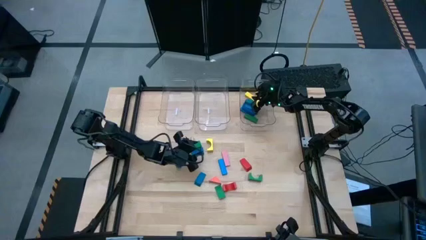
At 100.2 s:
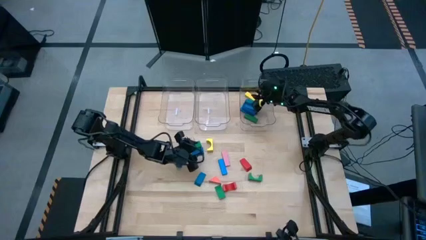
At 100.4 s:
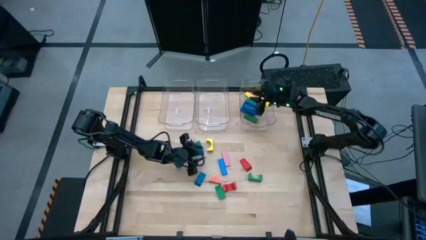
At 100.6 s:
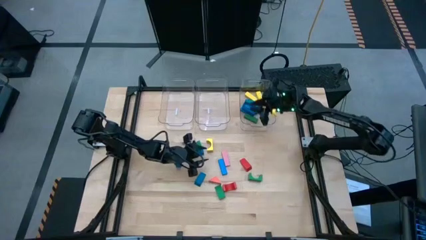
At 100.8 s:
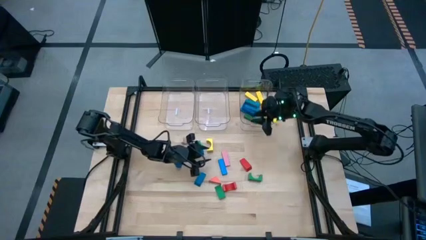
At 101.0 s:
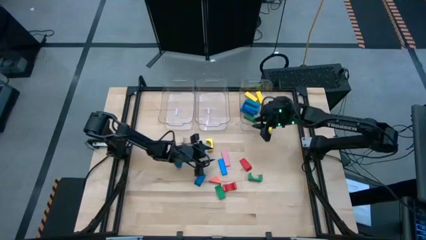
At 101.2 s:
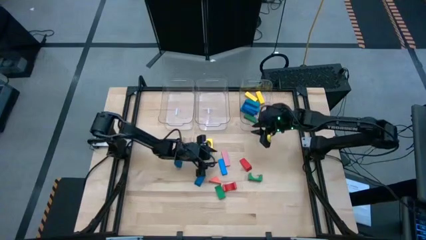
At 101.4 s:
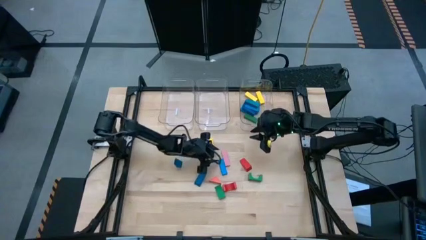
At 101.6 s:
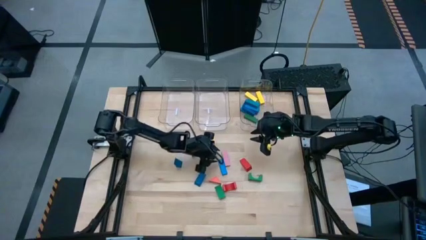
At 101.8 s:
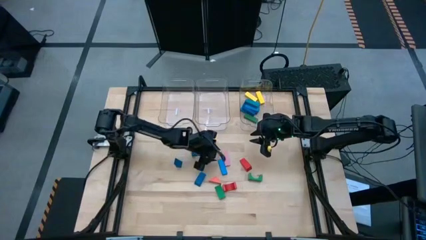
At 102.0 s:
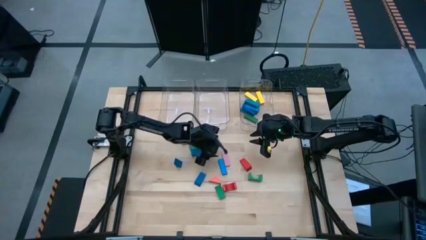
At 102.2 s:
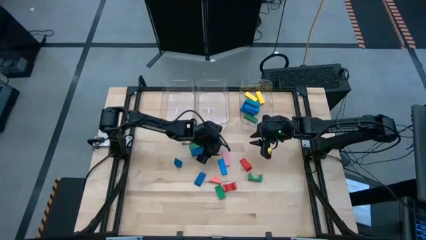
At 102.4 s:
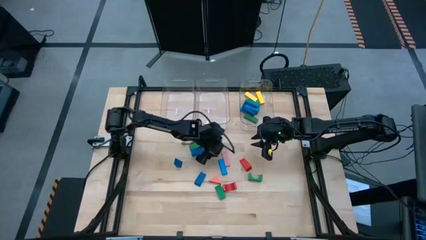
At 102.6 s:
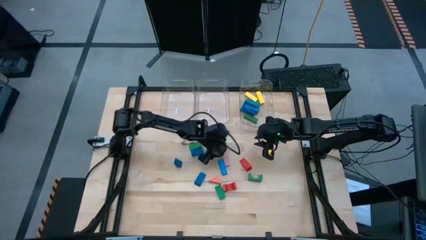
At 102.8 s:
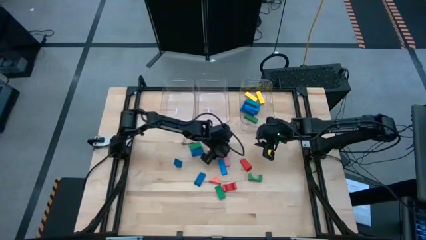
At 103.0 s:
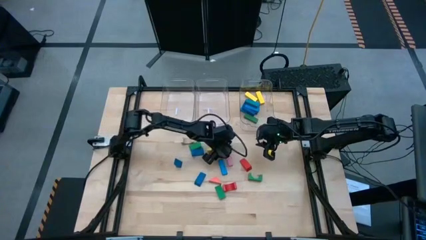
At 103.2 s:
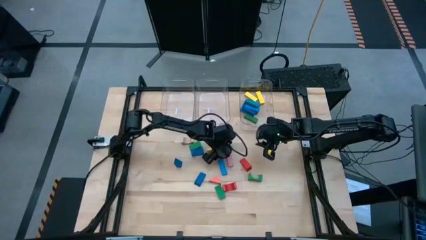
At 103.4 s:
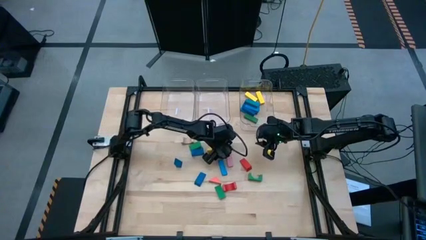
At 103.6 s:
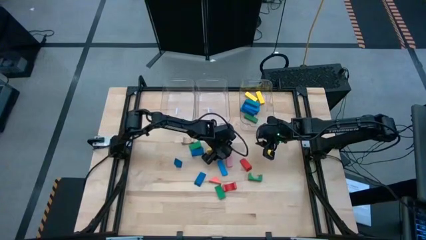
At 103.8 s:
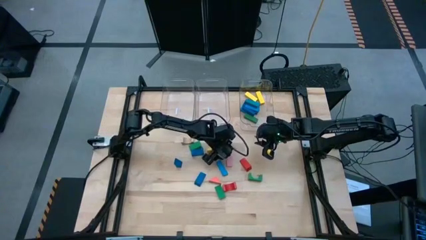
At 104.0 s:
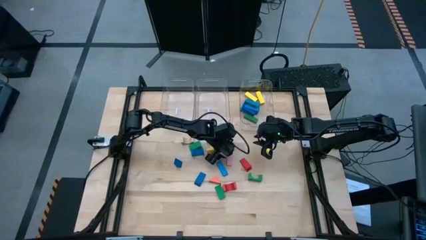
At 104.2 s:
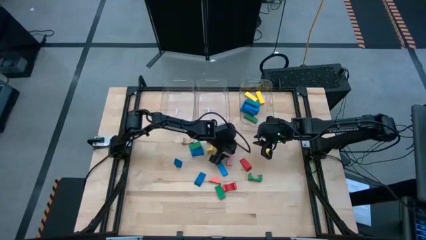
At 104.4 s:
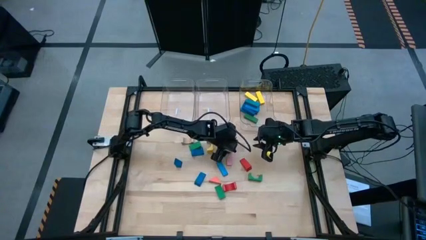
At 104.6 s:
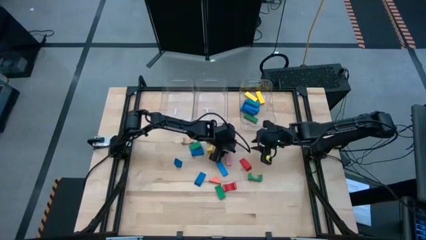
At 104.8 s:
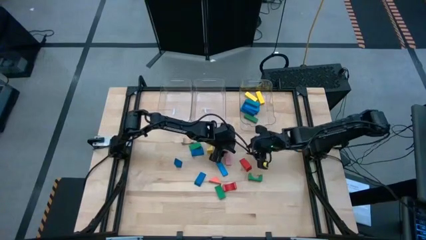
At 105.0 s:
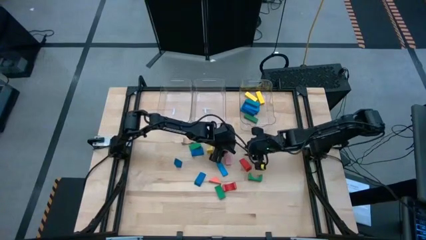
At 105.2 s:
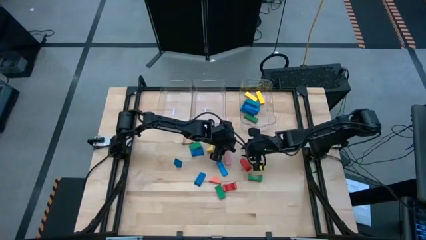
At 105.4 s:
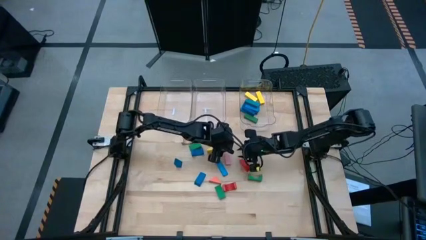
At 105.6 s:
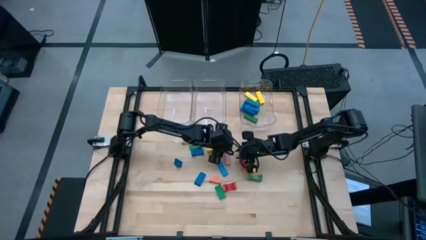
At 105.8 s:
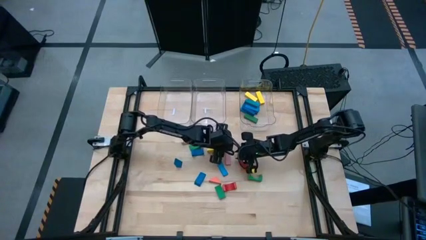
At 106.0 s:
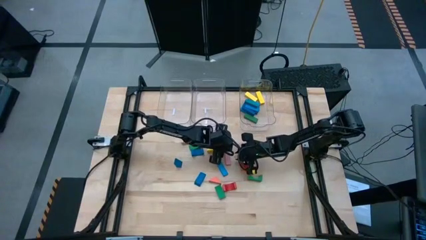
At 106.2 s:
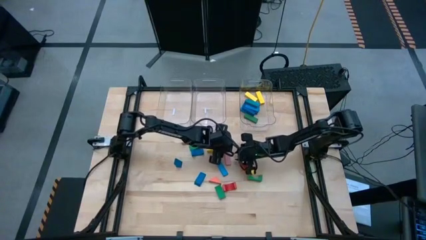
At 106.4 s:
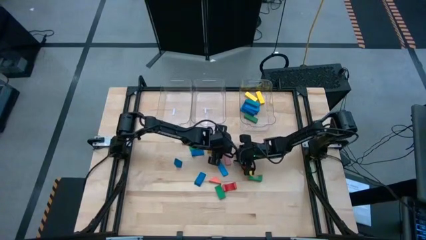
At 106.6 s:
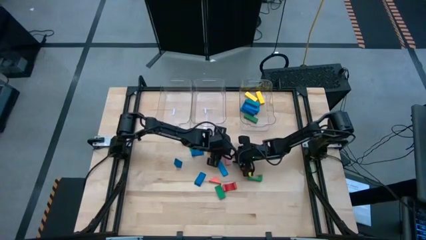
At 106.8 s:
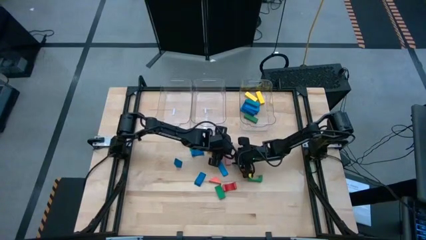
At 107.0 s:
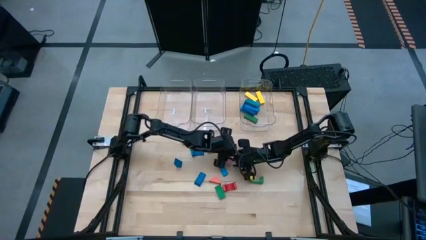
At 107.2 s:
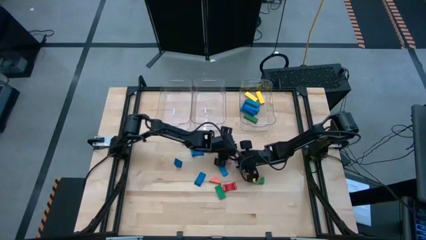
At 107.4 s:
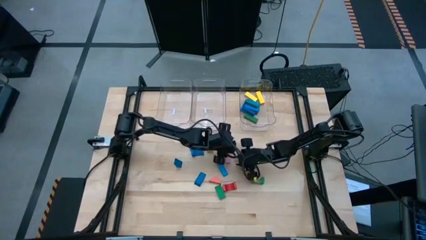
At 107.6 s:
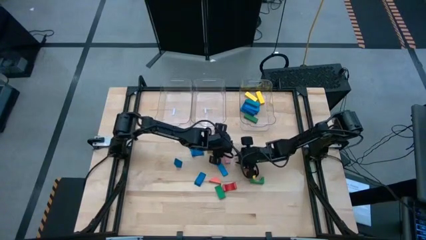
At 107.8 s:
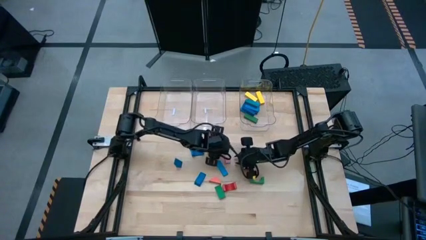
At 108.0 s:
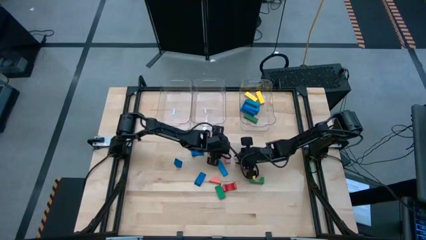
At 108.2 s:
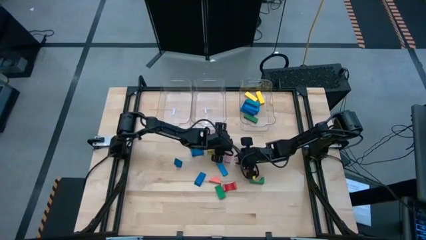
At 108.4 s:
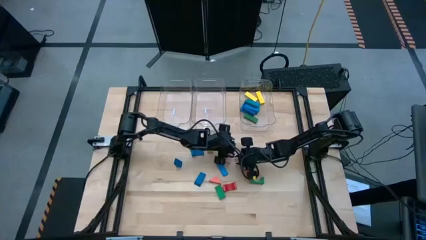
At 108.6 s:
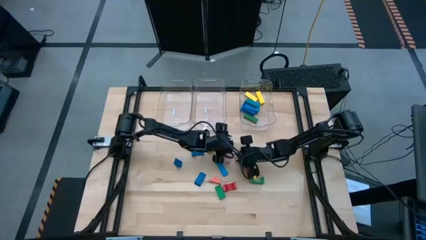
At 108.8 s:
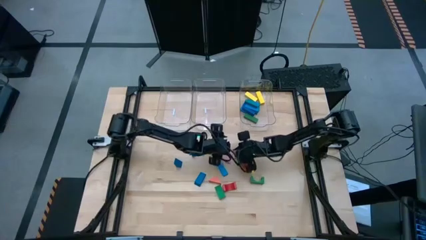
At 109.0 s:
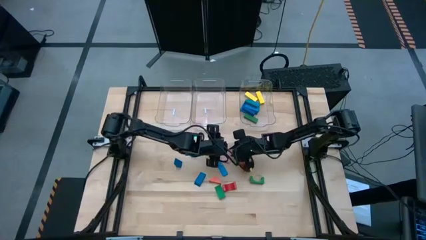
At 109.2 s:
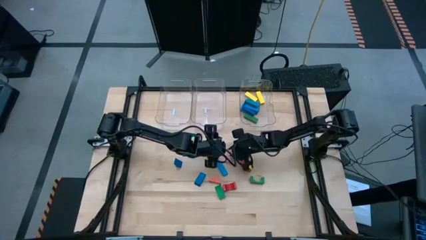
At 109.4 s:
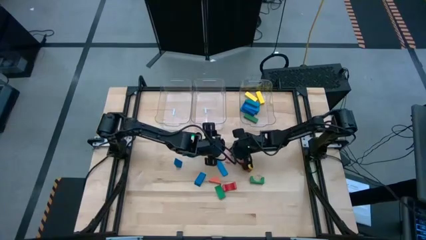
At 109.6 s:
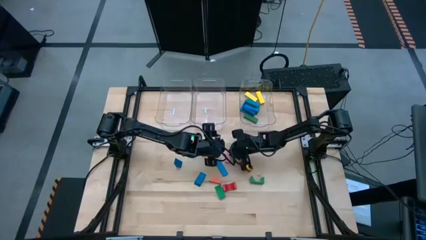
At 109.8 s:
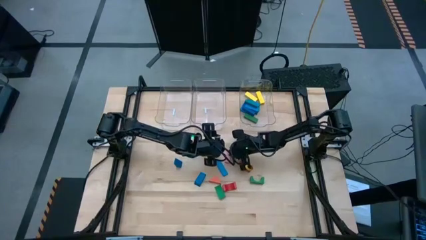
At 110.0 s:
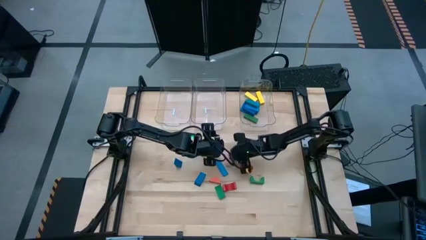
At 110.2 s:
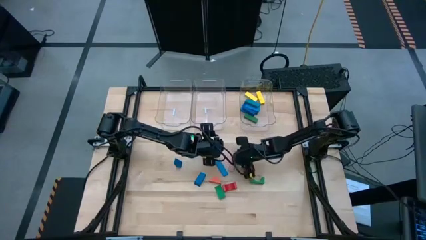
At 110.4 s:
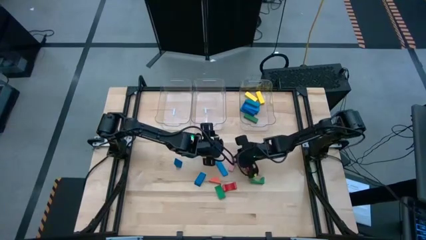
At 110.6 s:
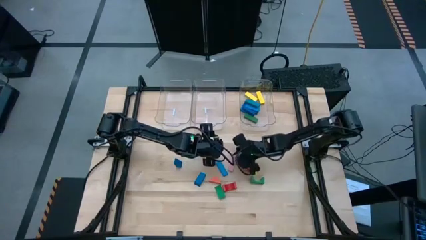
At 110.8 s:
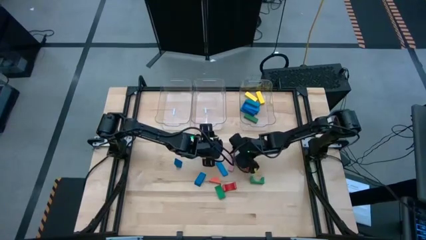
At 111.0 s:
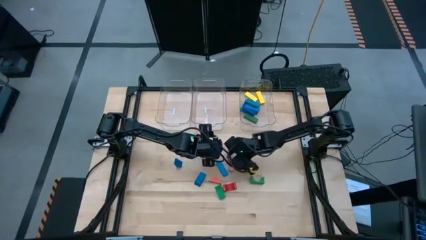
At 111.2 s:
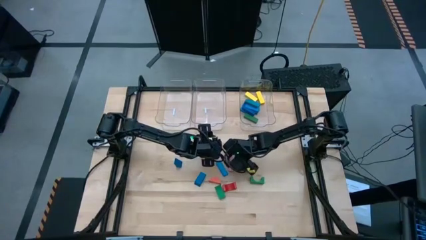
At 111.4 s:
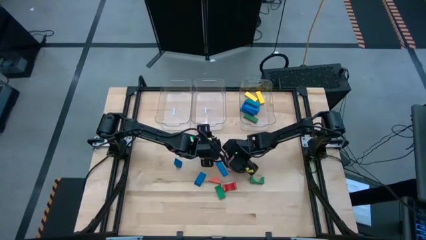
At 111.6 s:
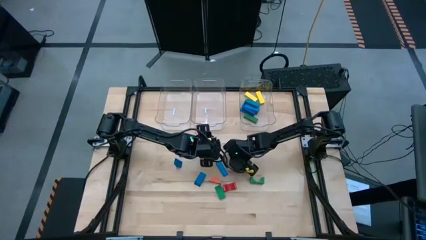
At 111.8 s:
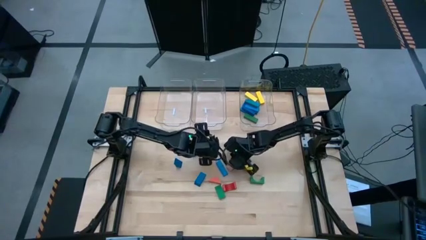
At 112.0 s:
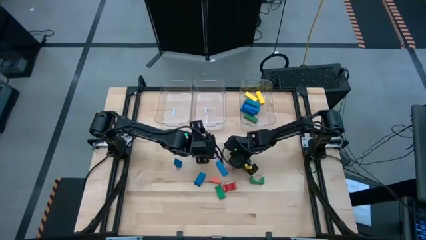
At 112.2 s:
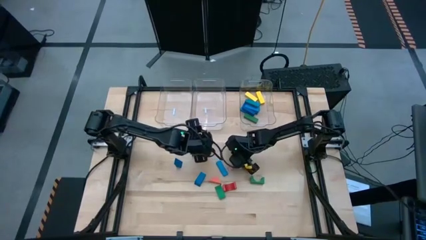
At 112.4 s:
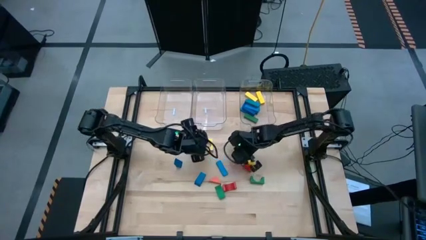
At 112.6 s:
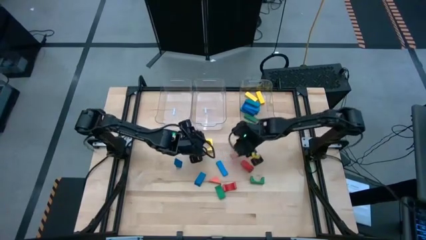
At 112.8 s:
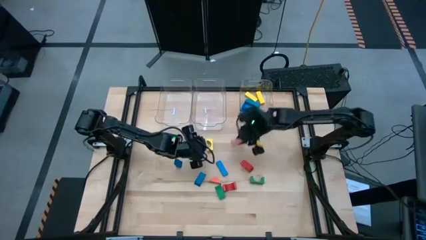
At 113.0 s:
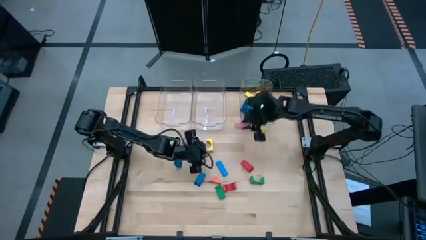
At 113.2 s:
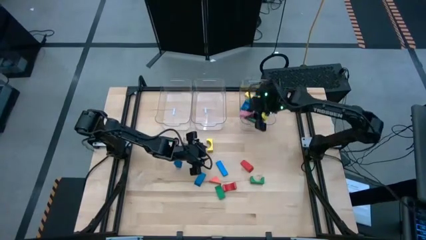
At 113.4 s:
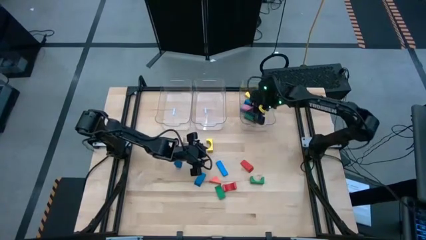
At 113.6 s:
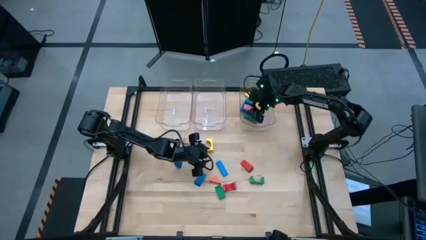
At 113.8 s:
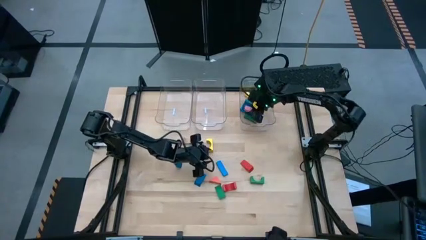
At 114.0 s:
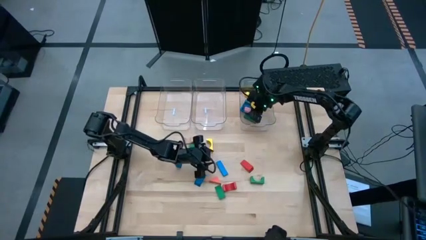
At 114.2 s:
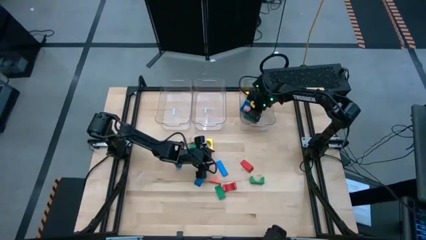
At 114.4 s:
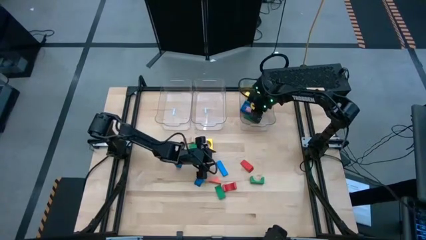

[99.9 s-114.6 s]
Task: Sort blocks by size
Put the pink rectangular block into the right transparent bin
